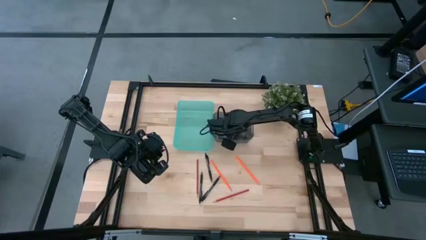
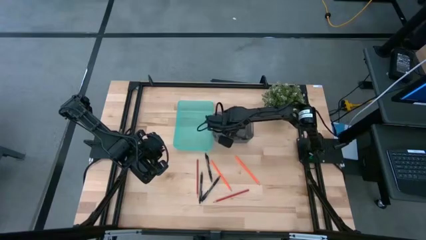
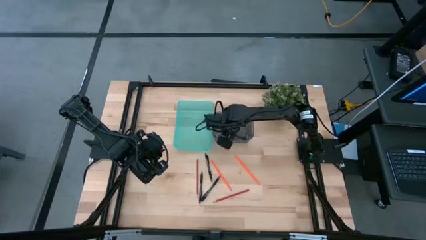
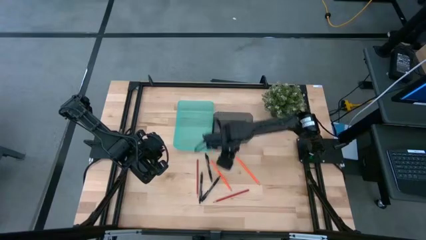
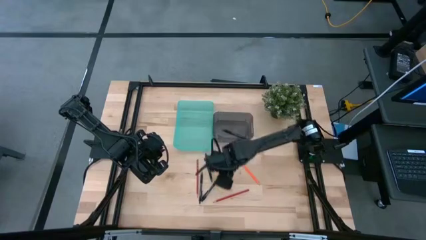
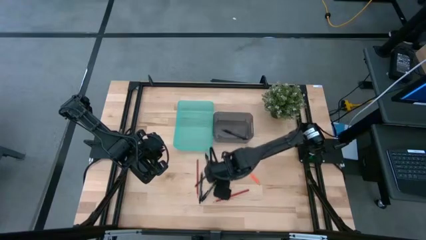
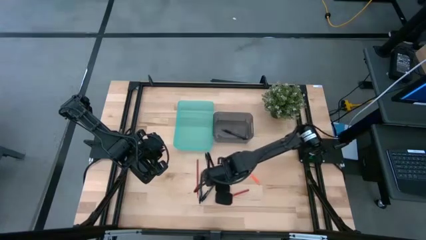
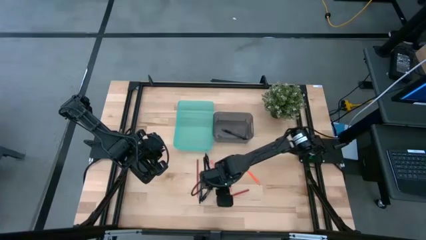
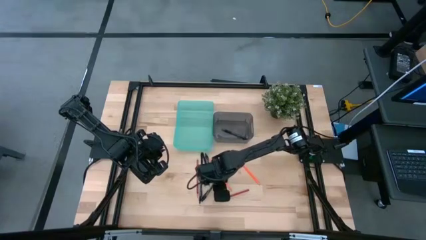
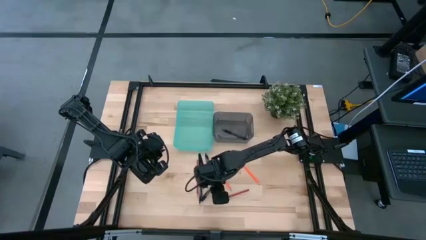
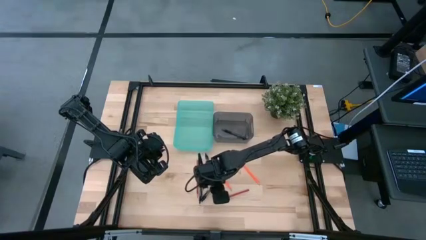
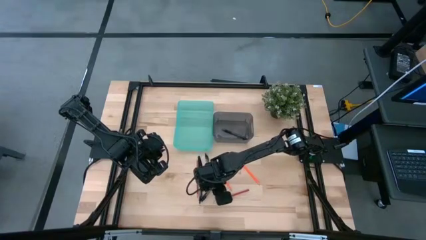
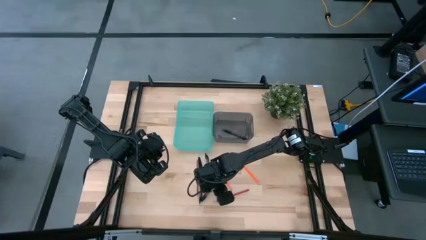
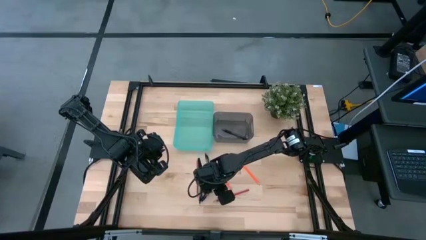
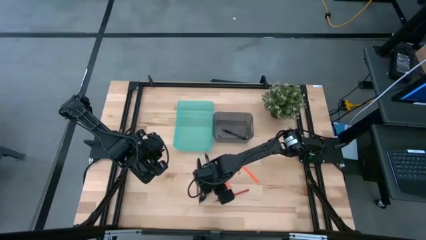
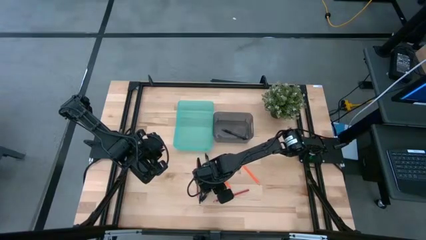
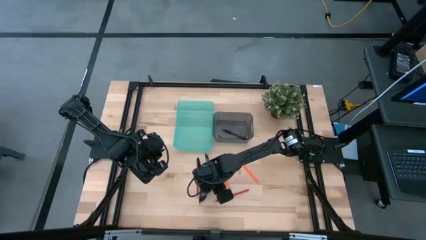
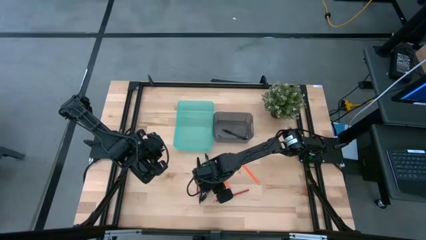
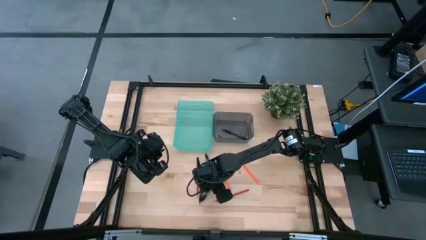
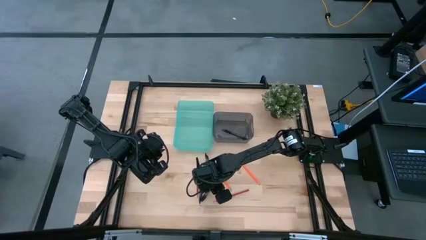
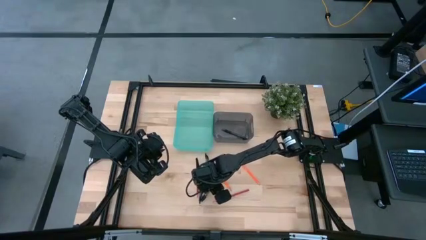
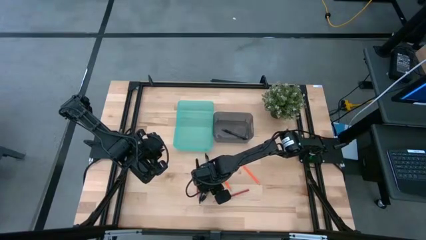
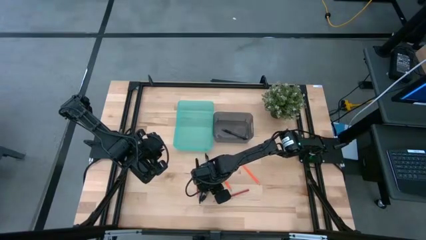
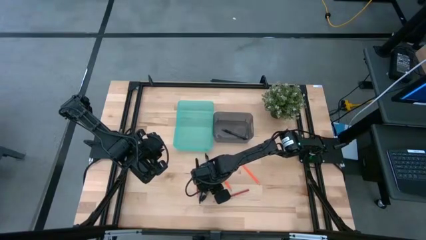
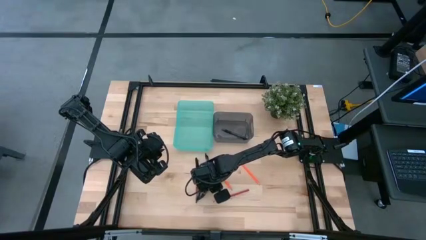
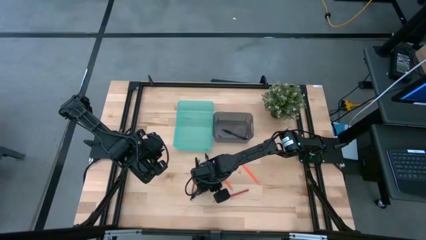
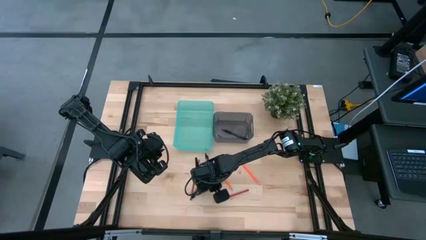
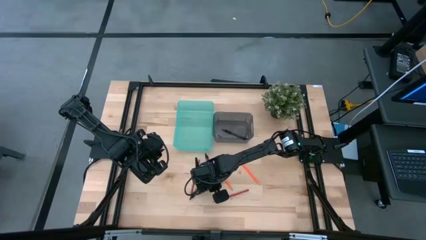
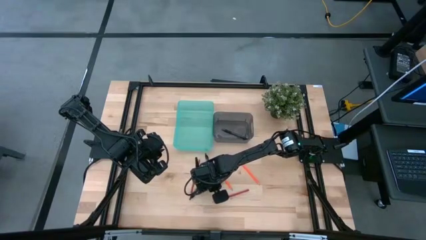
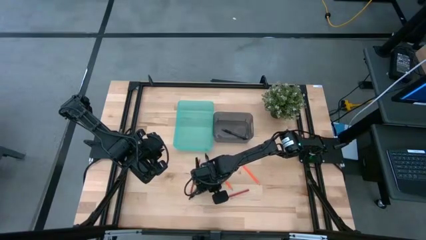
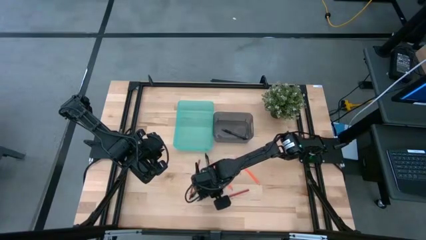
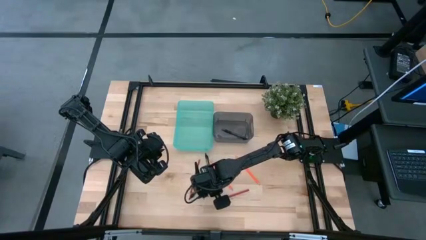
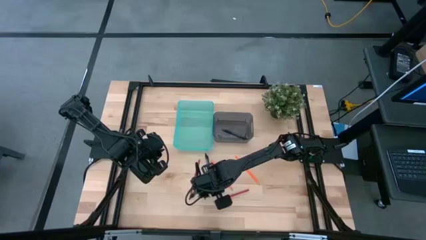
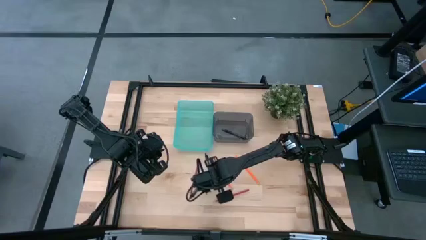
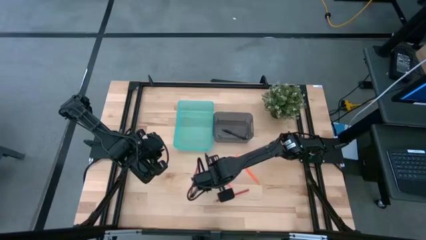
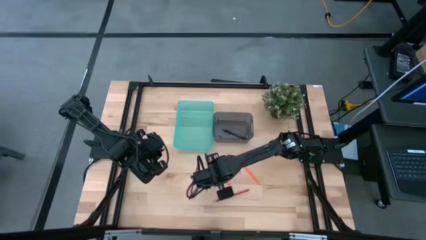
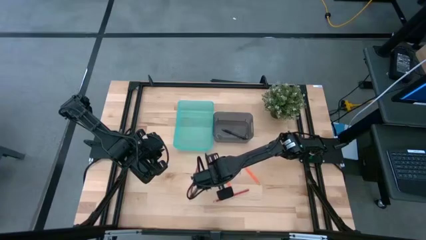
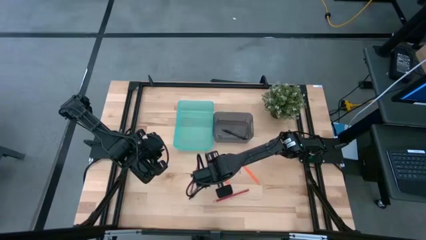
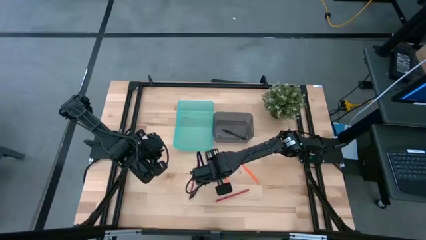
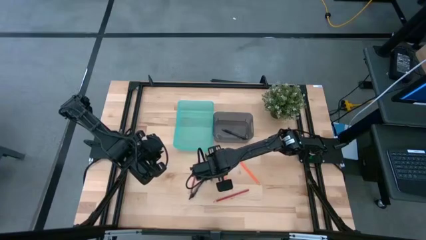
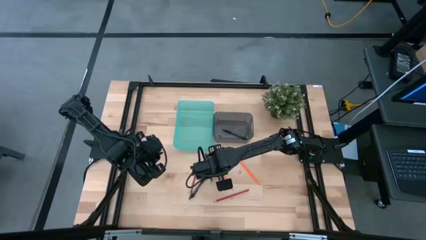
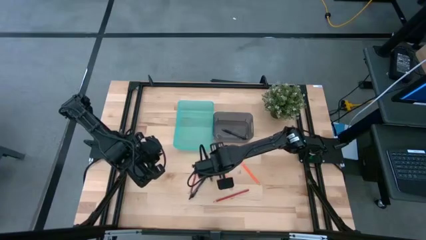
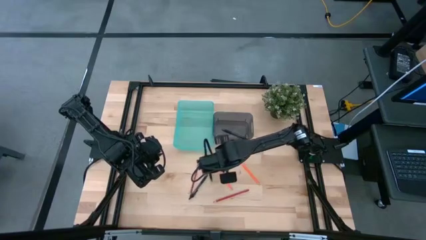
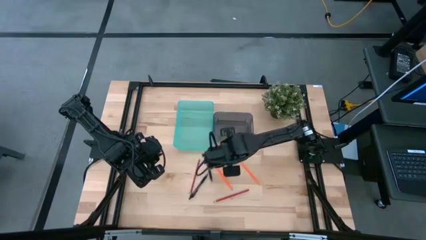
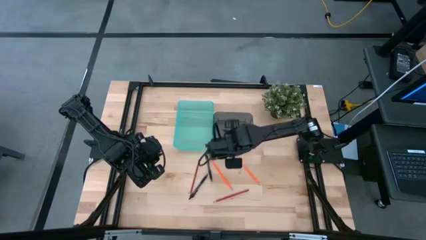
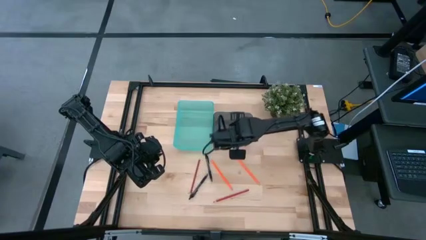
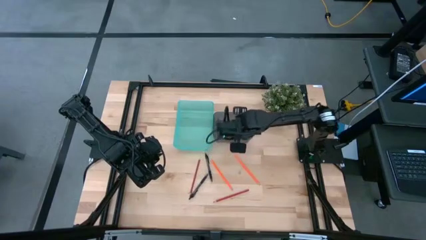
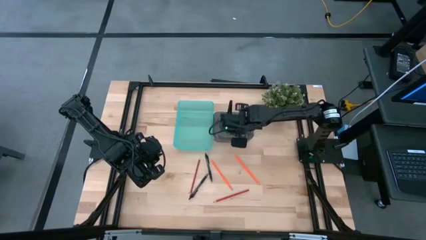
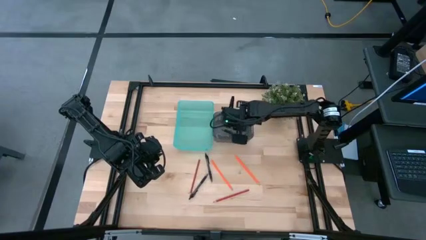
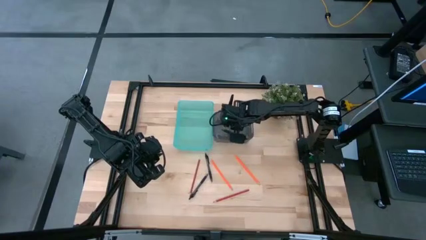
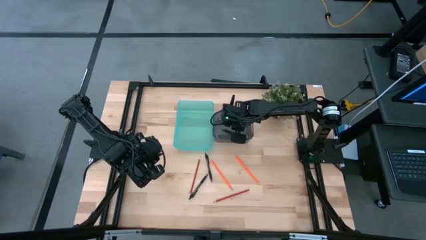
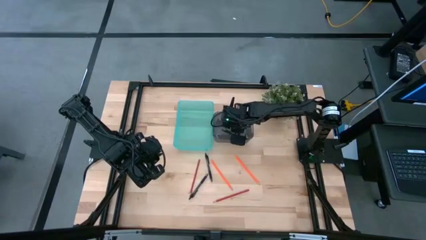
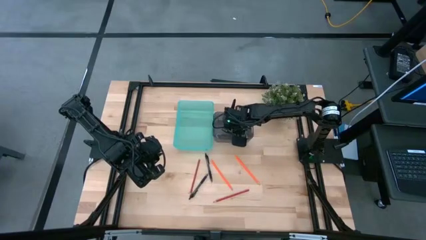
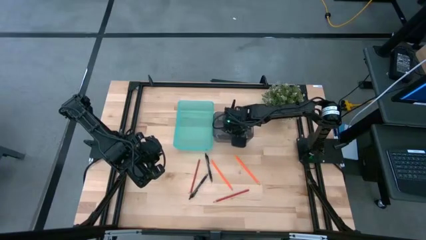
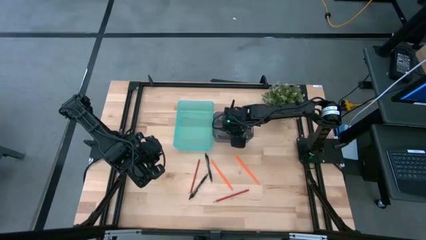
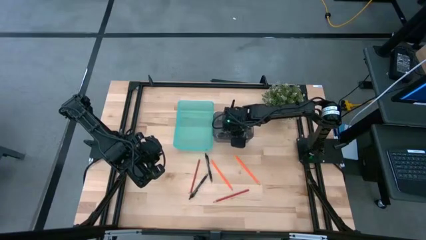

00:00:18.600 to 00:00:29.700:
Task: Sort pens & pencils
Put the black pen into the black bin
